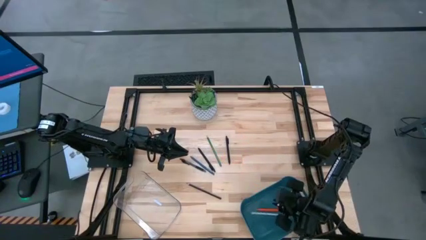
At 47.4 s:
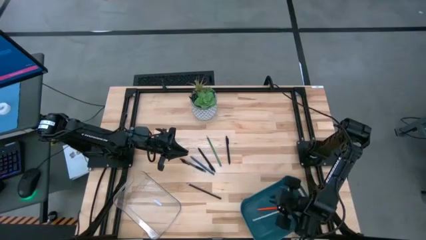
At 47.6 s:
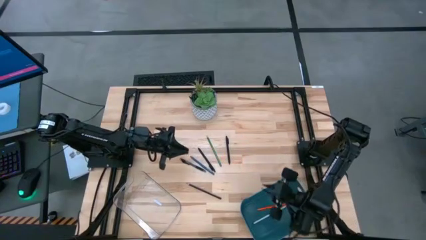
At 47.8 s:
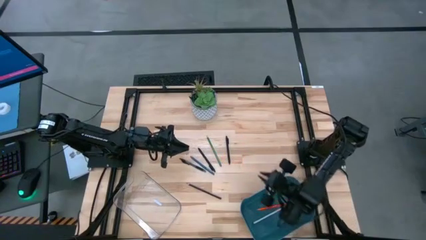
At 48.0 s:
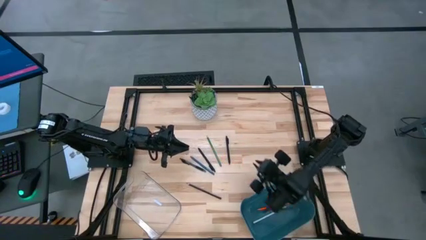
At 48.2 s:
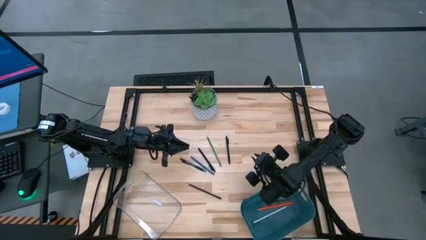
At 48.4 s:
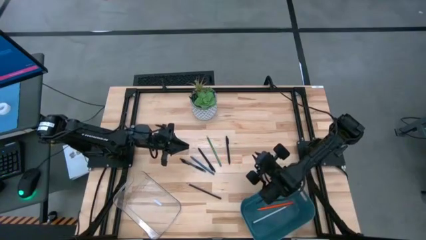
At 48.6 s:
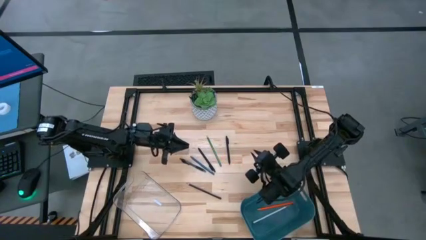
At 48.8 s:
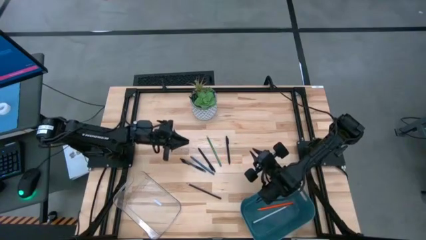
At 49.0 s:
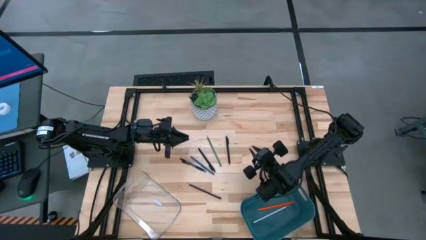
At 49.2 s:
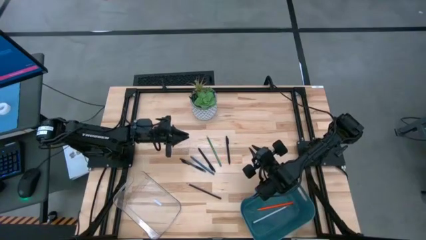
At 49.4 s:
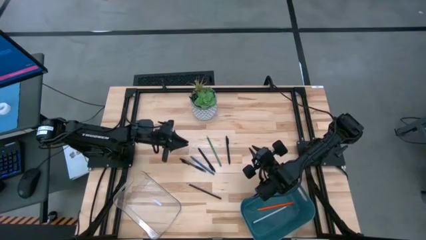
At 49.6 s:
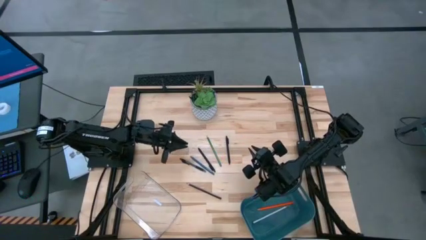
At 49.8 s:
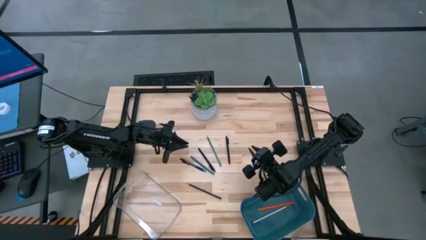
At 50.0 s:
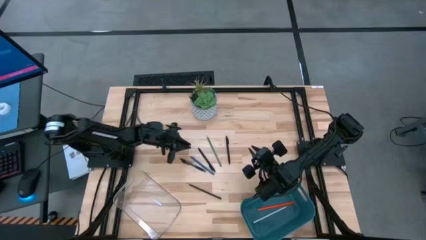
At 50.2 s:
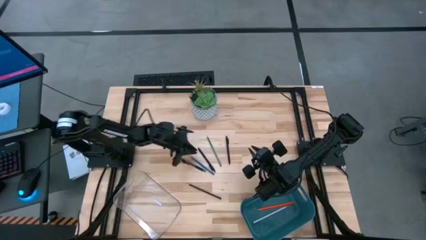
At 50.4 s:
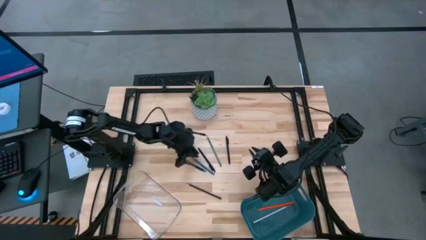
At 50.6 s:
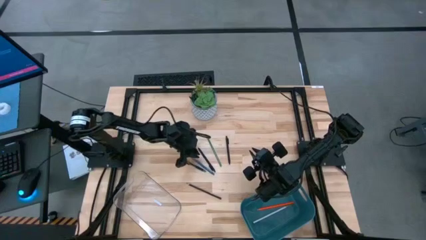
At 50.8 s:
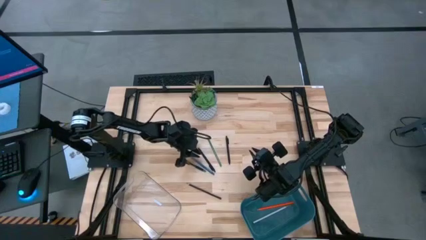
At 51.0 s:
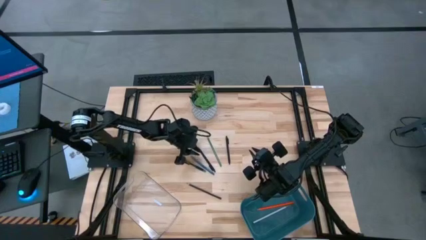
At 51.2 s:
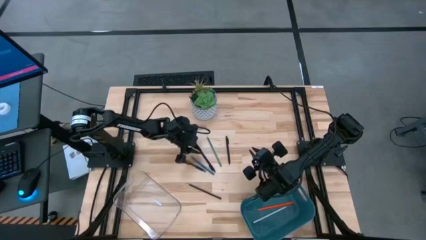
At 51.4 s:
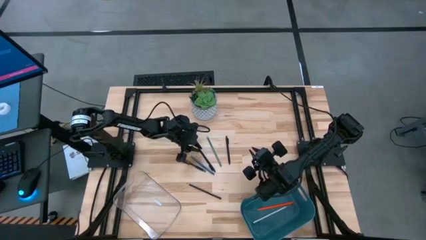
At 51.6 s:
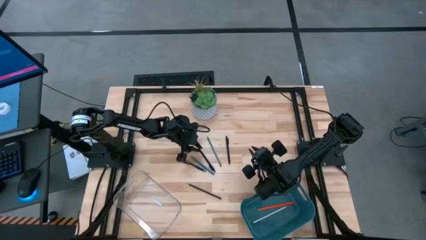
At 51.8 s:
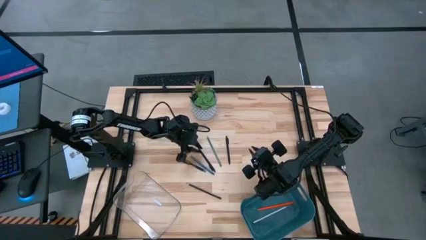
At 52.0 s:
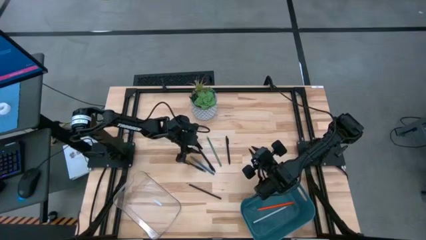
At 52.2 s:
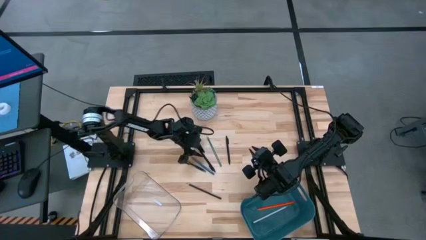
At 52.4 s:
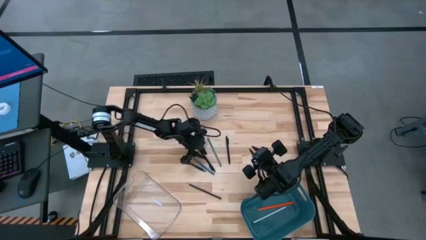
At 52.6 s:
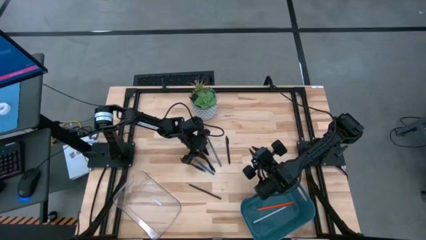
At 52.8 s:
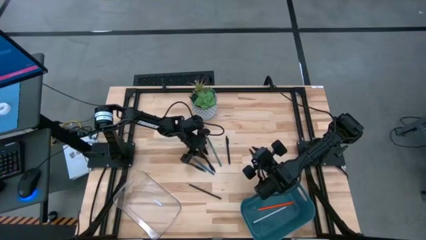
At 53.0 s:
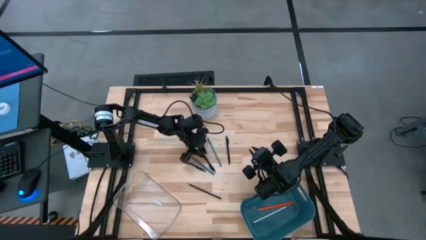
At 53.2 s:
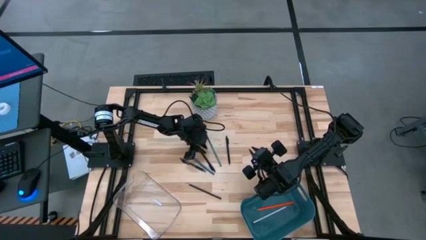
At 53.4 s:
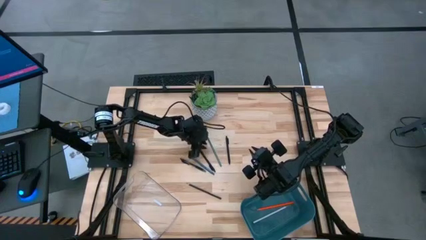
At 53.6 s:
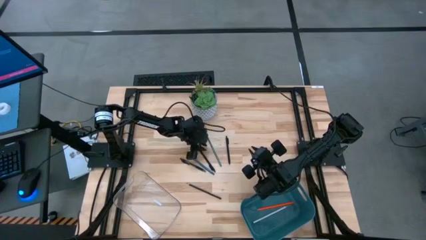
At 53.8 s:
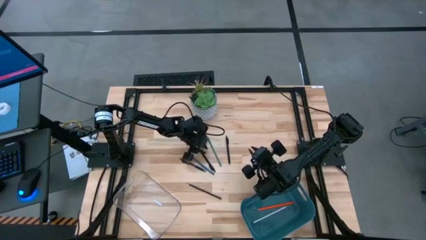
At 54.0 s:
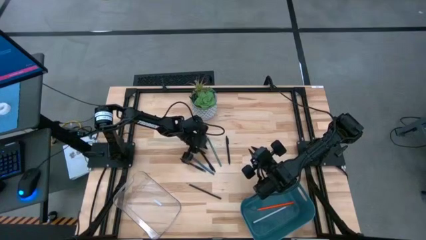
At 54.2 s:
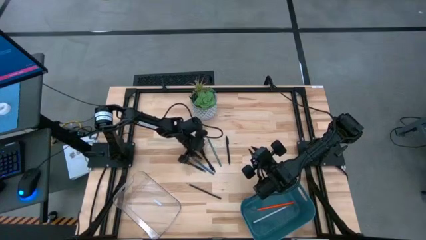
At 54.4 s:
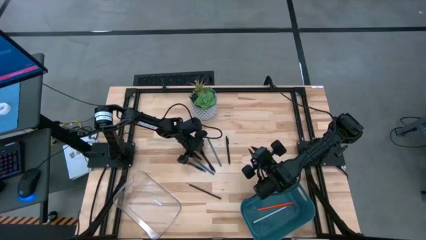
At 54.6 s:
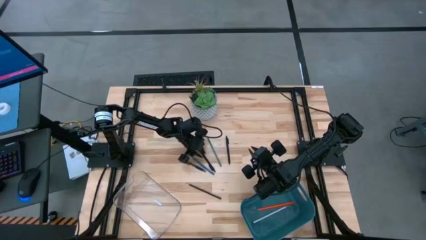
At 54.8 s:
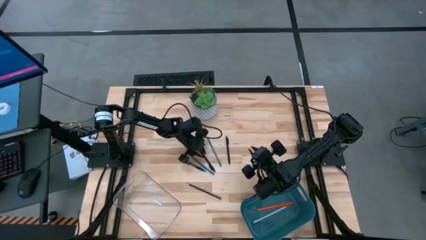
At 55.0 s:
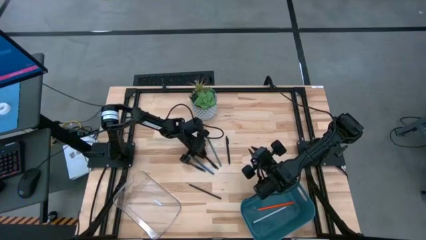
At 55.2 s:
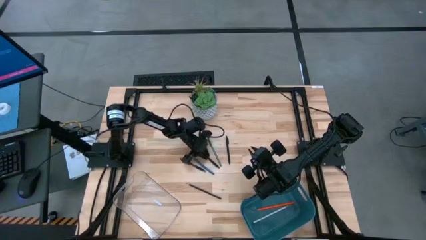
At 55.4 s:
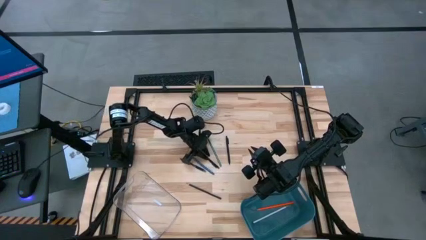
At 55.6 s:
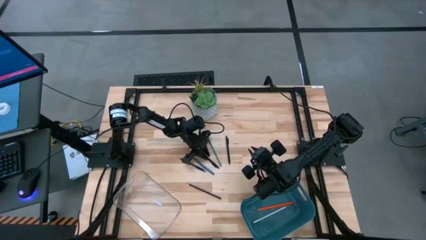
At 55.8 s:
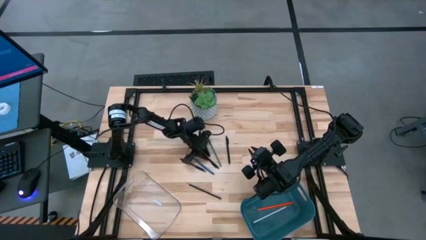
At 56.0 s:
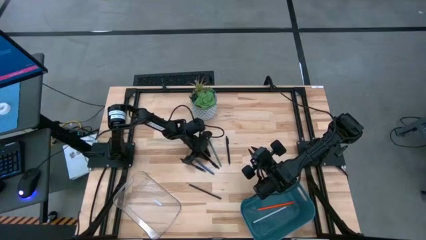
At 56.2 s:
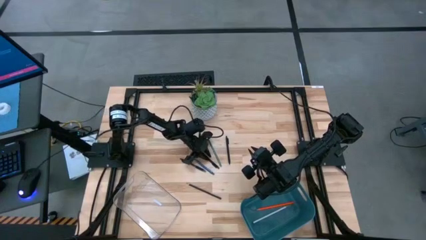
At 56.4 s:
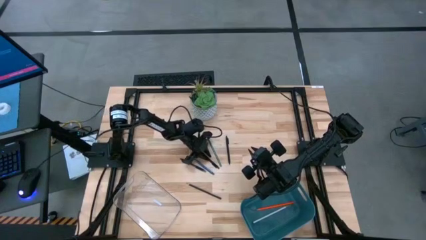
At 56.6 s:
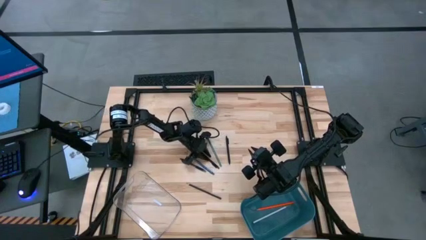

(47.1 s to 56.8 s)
Task: Sort pens & pencils
Put the middle black pen into the transparent bin

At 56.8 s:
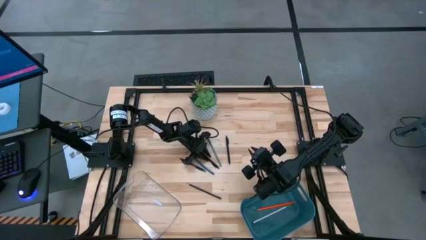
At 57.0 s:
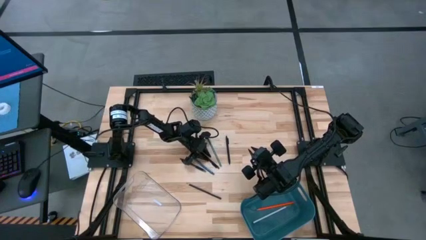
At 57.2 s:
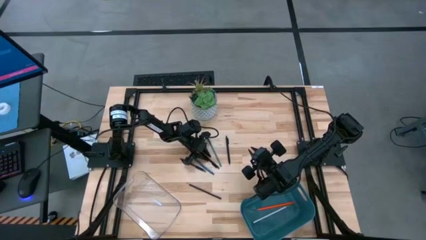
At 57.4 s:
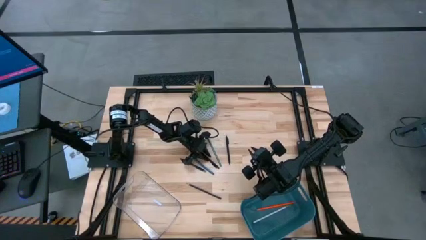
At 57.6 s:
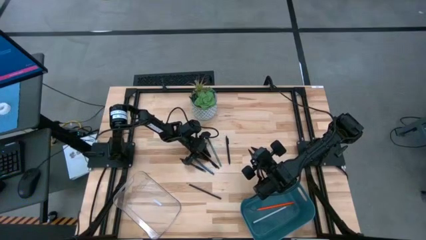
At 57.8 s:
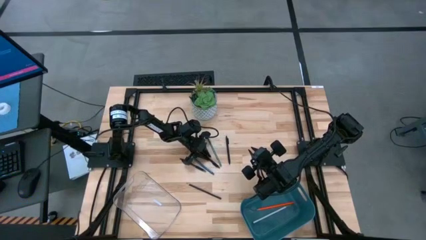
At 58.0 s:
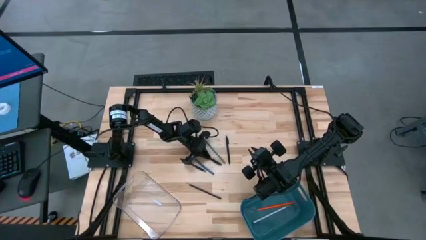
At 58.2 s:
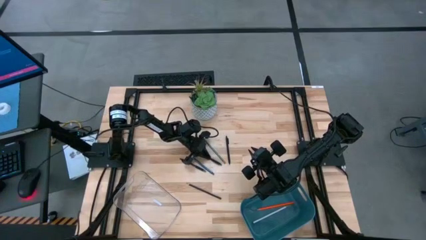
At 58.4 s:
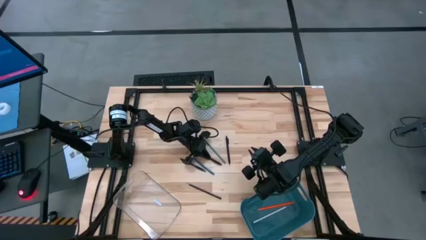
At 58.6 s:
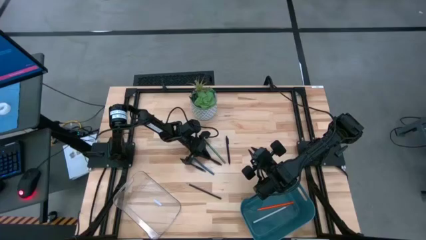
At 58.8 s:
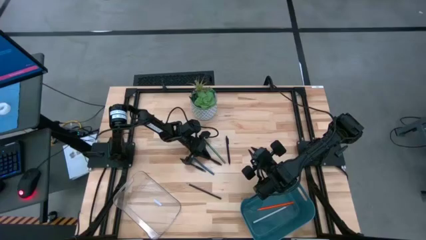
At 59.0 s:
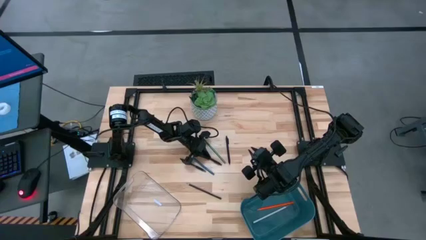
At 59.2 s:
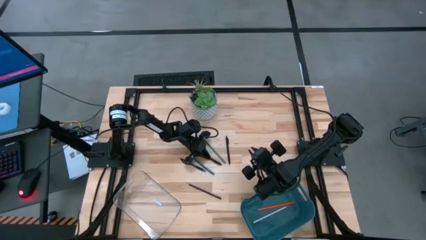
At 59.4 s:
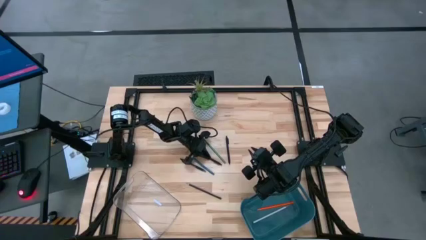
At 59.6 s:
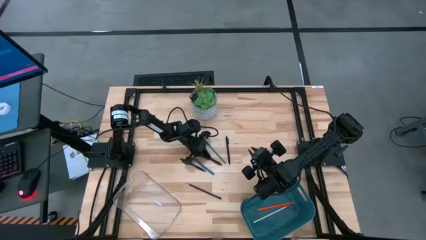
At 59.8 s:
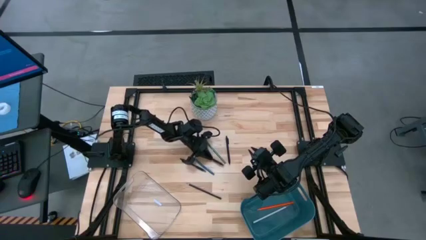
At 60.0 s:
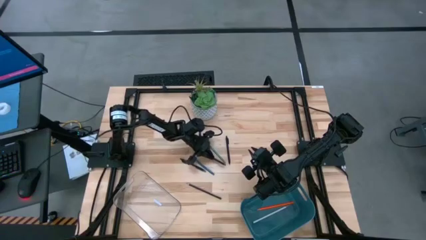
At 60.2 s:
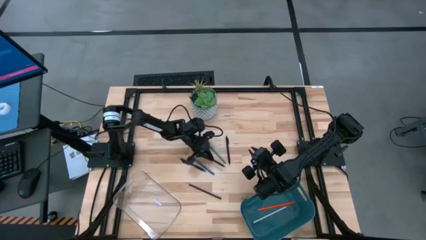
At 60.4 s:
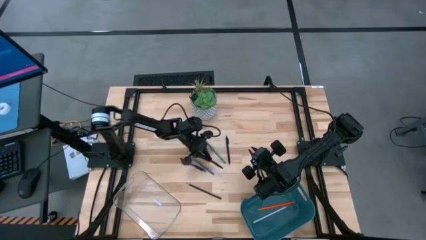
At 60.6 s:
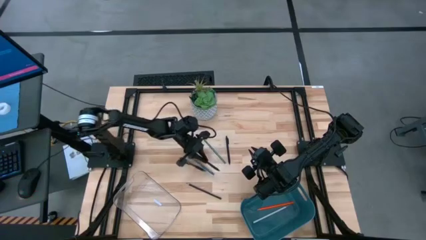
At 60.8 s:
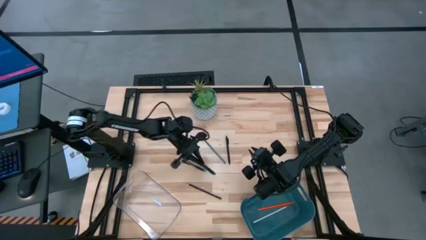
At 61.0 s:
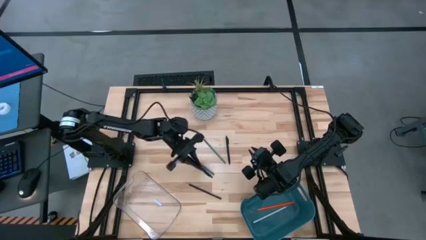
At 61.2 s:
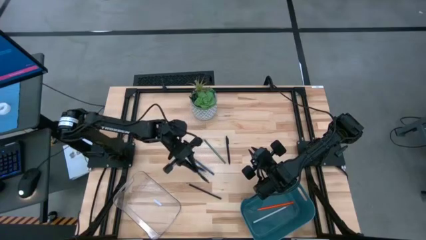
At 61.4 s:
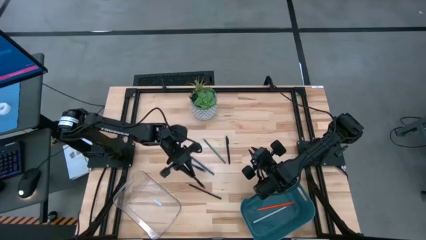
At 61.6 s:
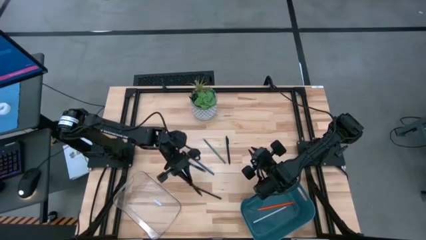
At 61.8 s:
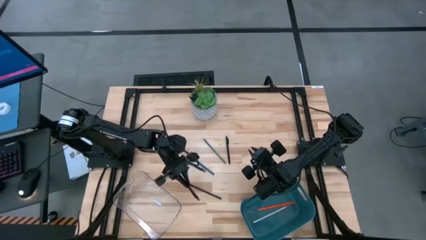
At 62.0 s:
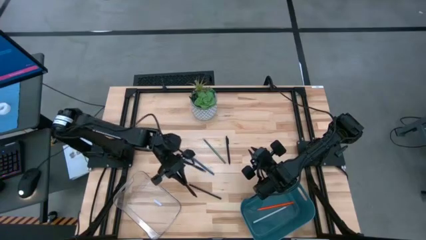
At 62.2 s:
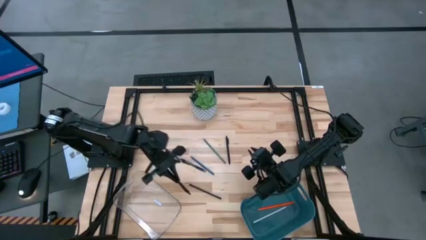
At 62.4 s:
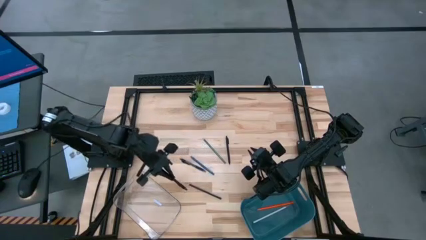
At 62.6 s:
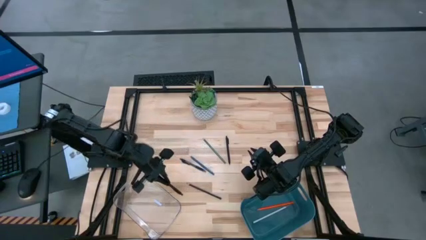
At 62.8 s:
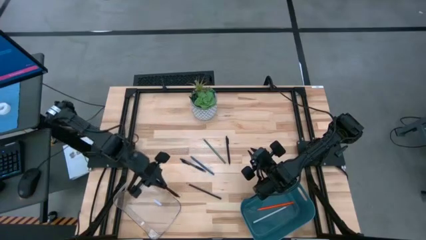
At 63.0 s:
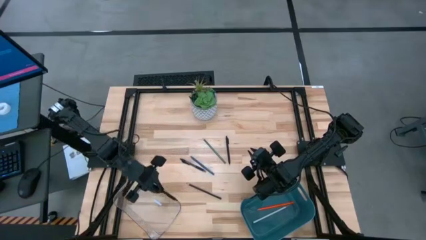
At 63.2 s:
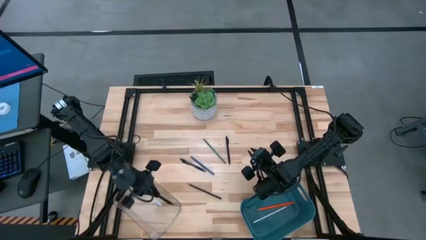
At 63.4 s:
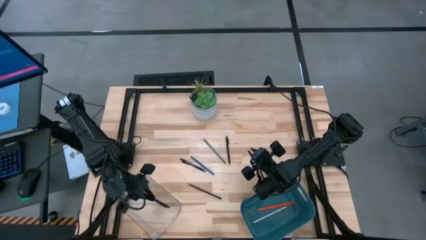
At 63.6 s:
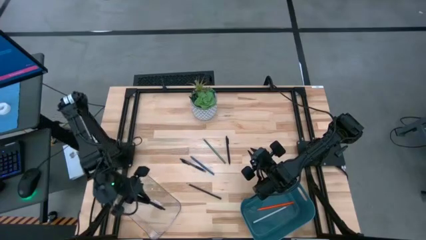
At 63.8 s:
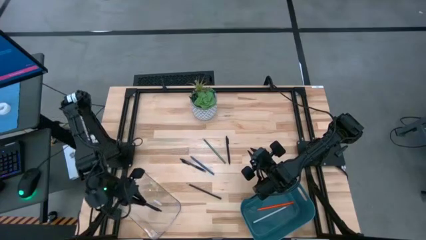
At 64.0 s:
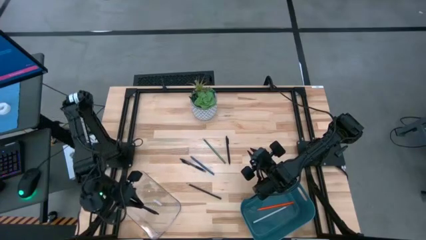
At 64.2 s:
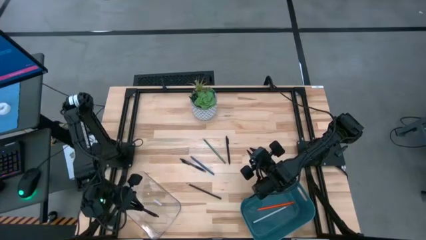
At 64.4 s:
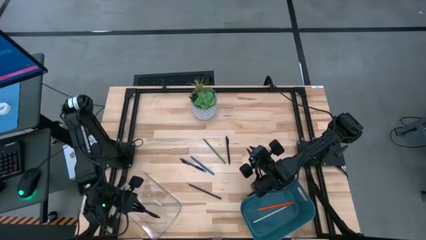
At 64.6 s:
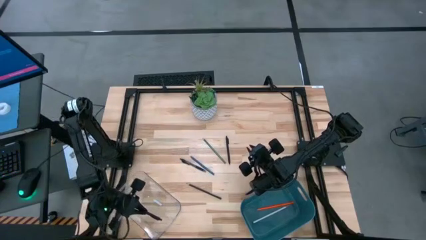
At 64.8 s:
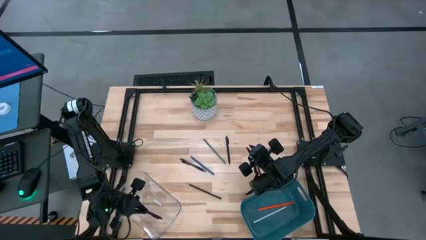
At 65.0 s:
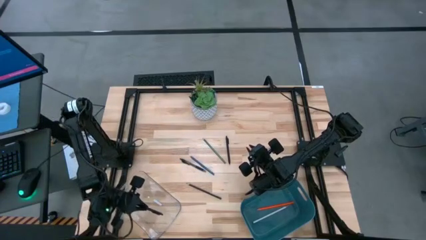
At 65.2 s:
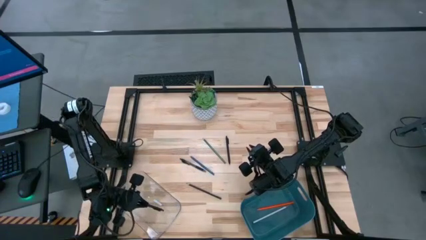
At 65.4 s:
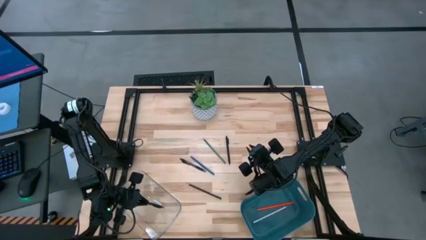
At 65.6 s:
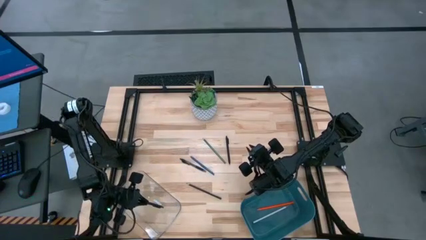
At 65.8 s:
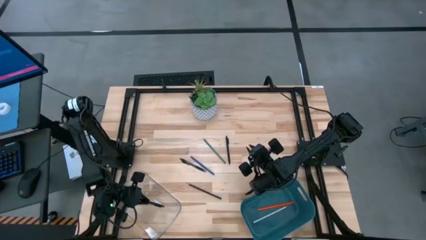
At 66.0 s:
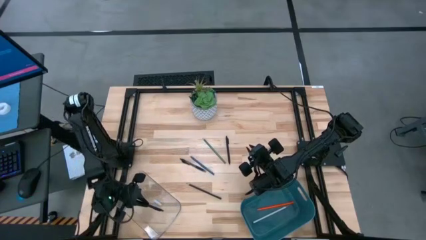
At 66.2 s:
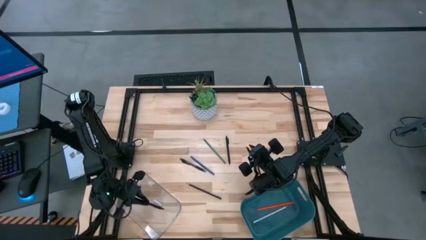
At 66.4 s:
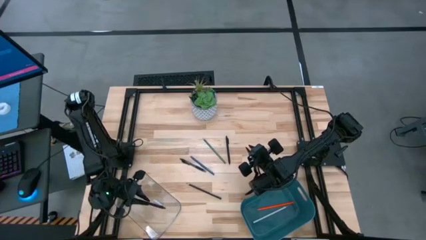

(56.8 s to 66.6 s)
Put the middle black pen into the transparent bin
